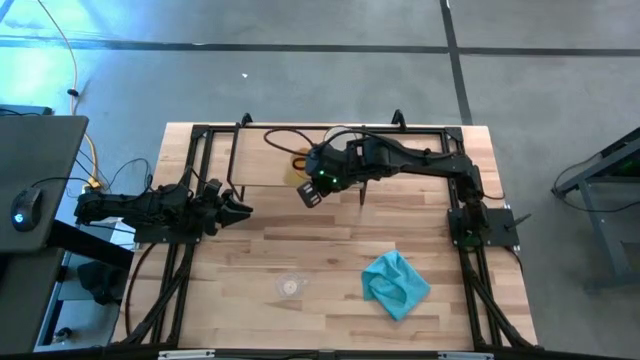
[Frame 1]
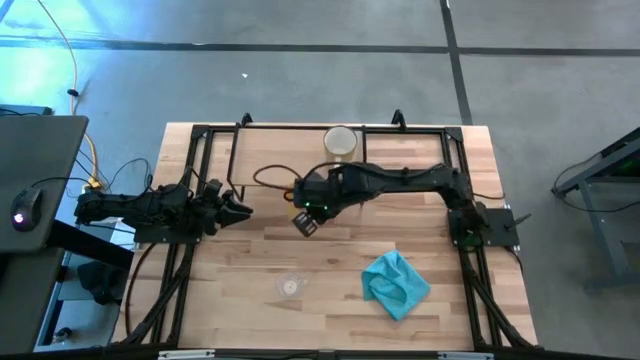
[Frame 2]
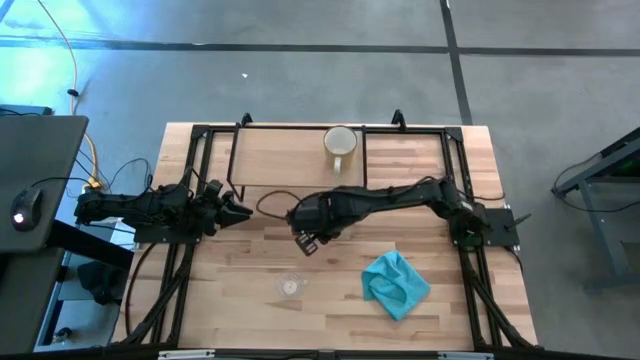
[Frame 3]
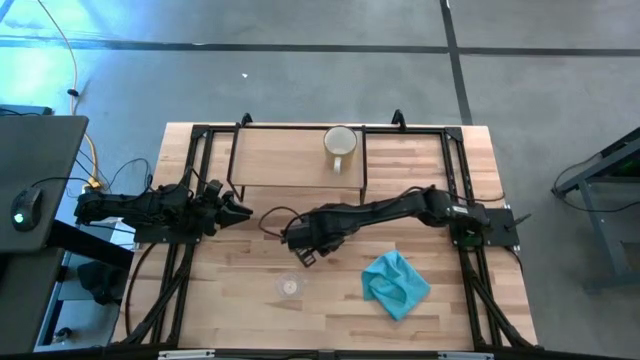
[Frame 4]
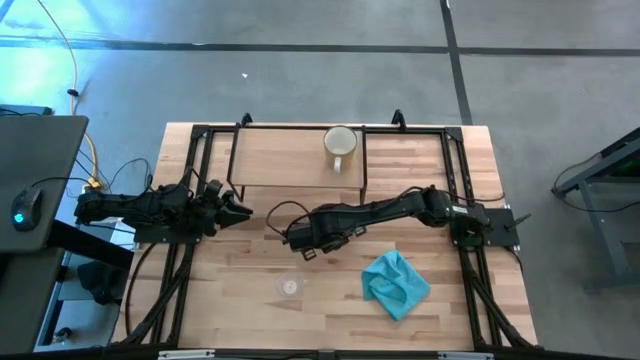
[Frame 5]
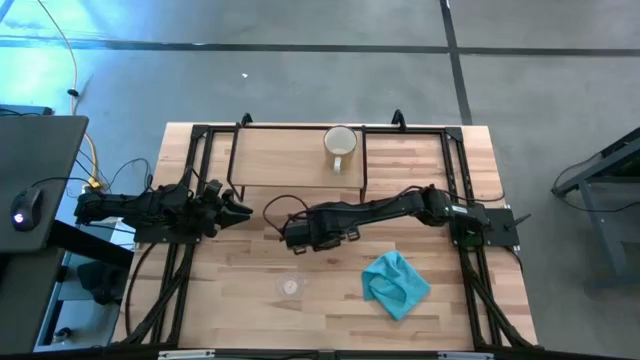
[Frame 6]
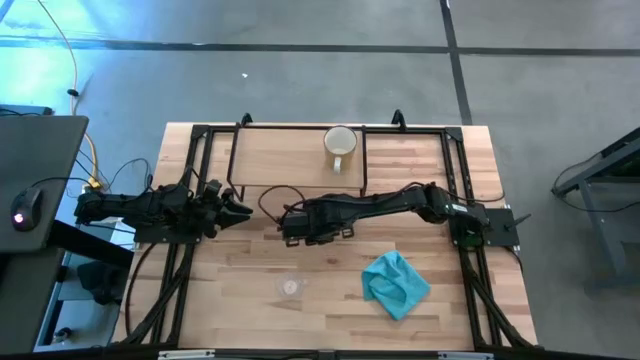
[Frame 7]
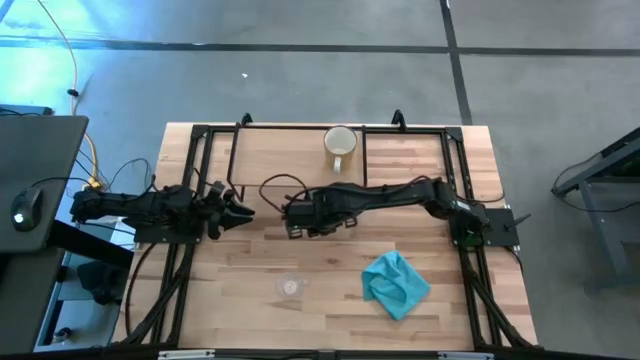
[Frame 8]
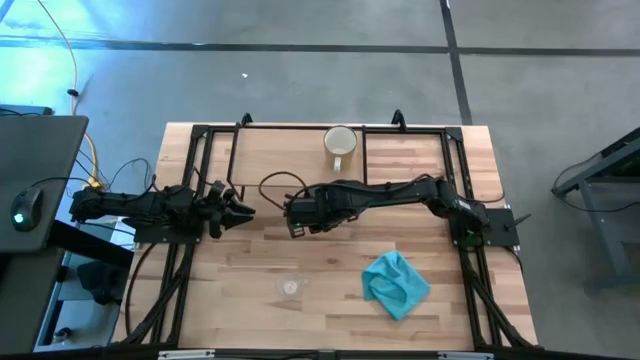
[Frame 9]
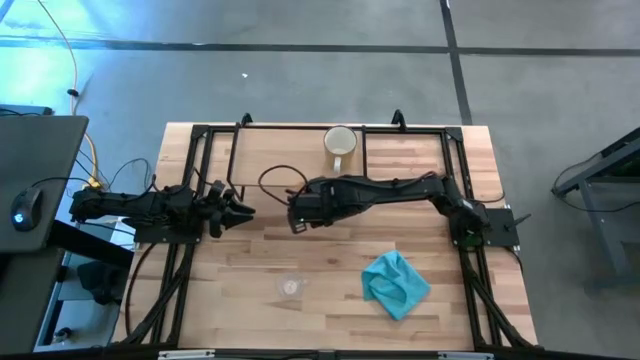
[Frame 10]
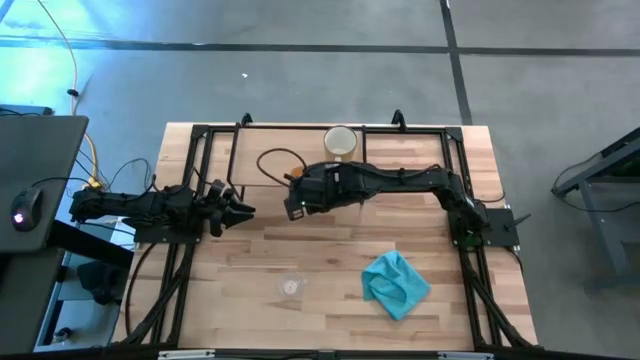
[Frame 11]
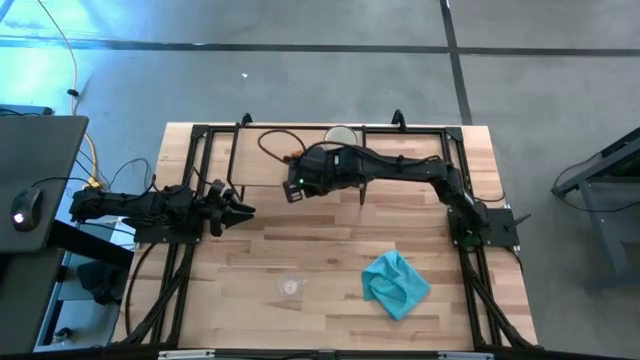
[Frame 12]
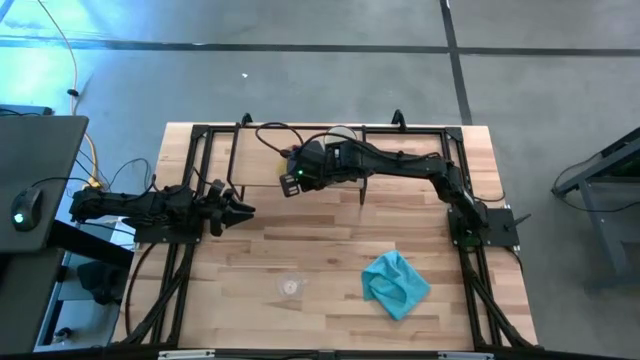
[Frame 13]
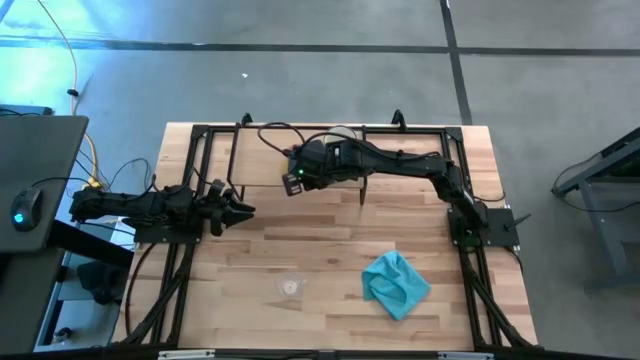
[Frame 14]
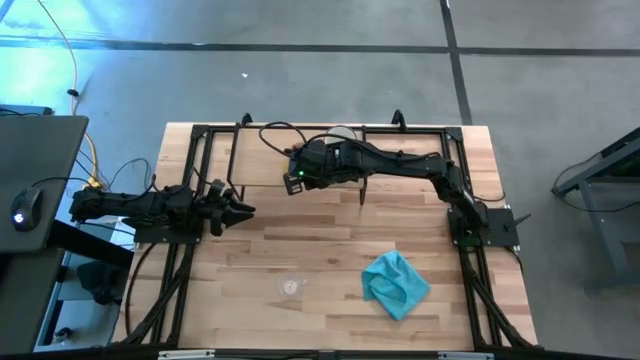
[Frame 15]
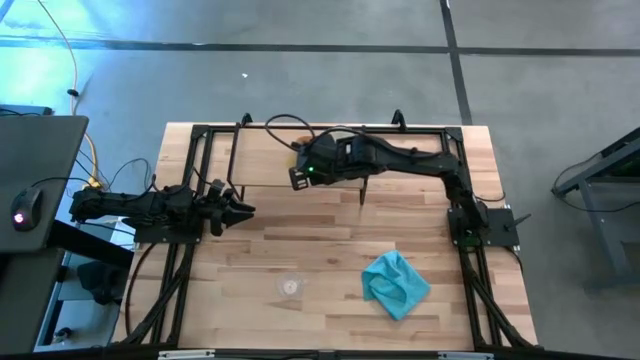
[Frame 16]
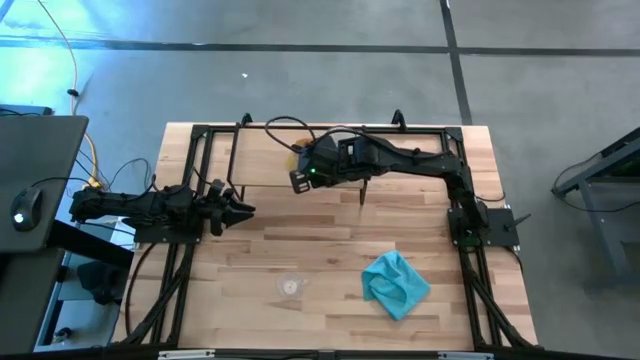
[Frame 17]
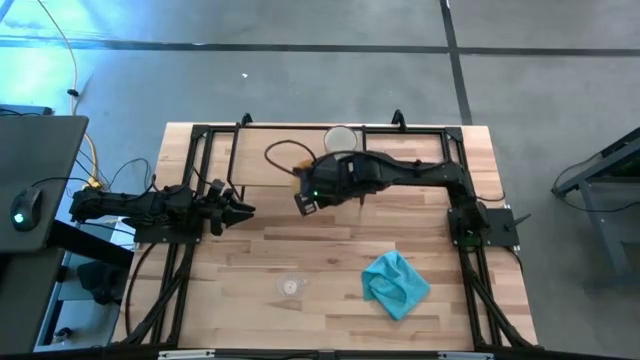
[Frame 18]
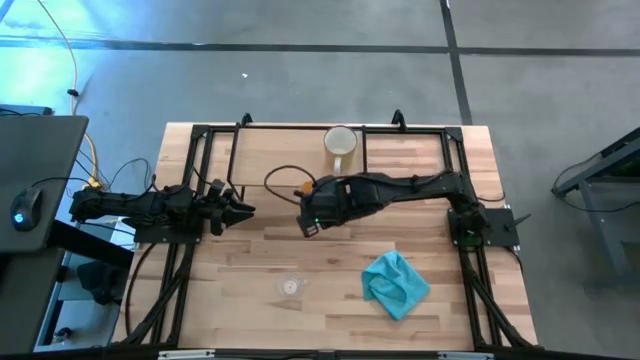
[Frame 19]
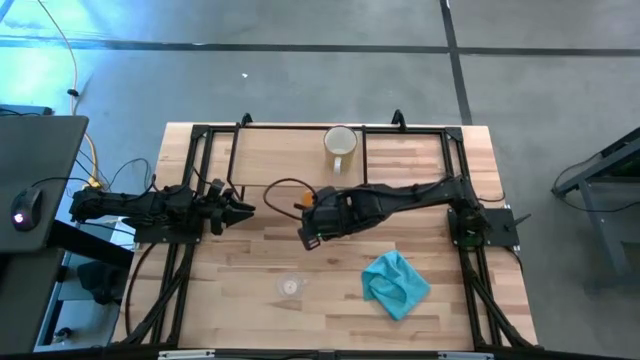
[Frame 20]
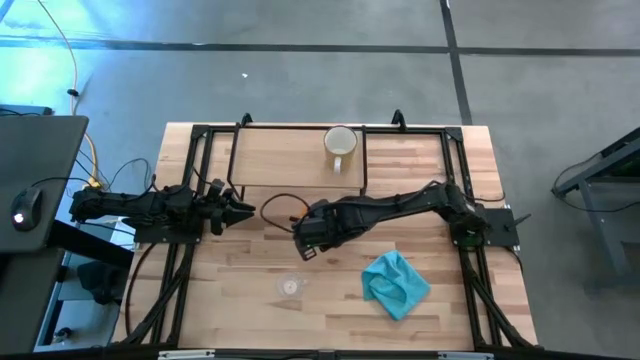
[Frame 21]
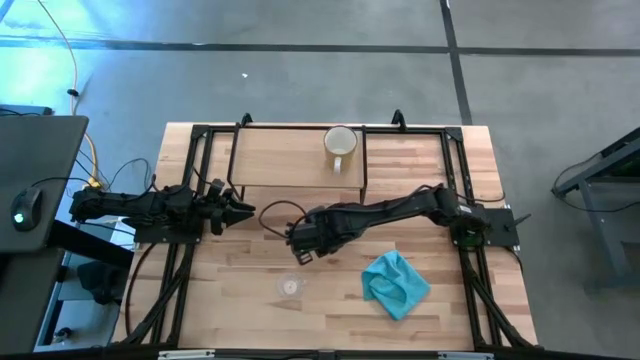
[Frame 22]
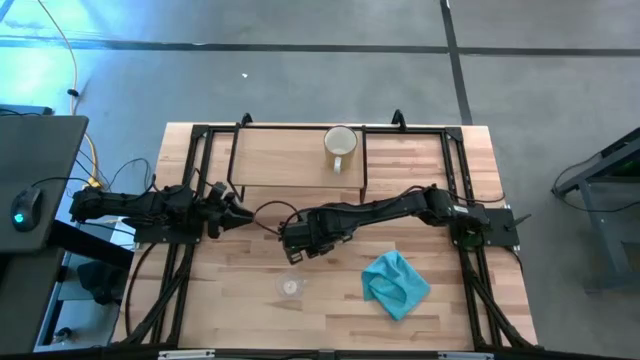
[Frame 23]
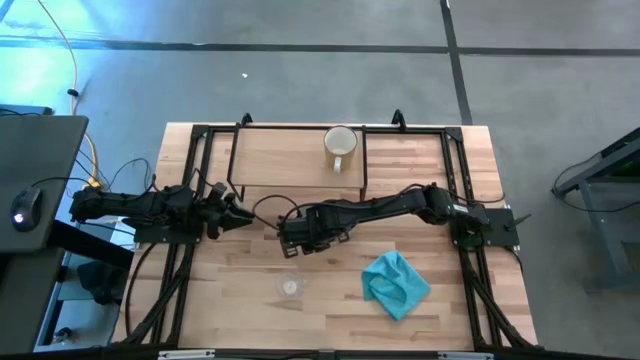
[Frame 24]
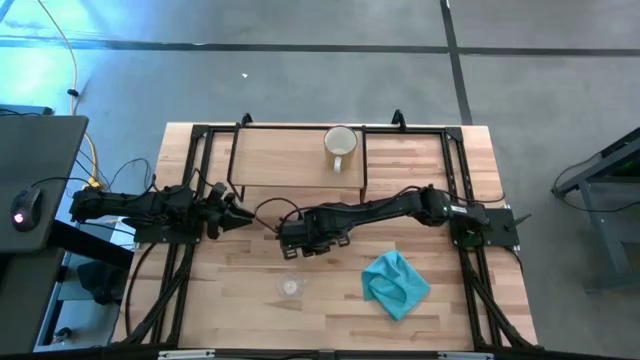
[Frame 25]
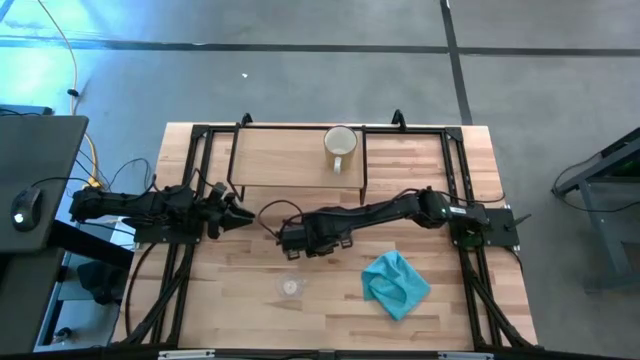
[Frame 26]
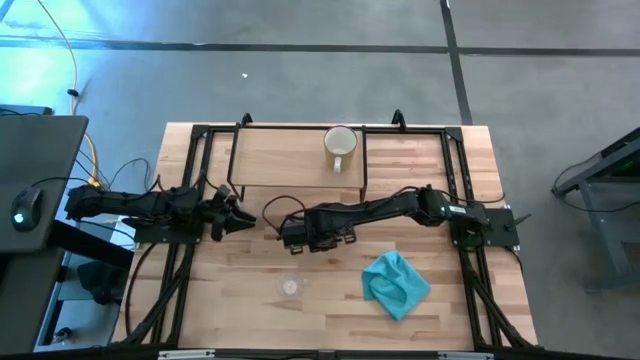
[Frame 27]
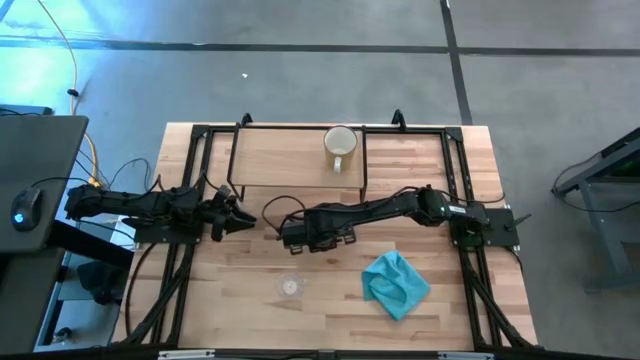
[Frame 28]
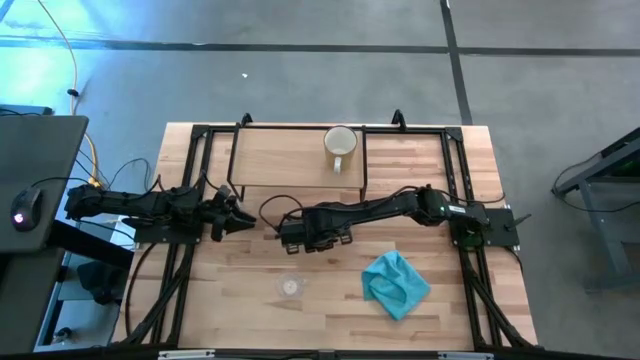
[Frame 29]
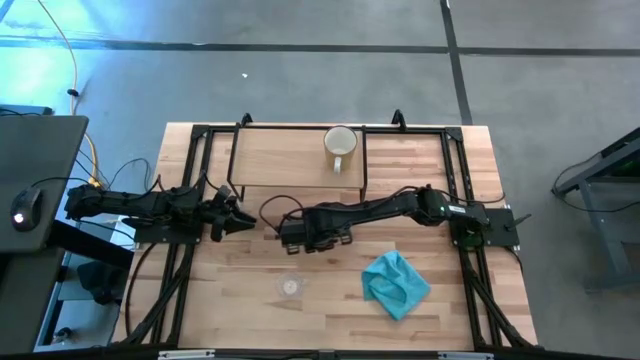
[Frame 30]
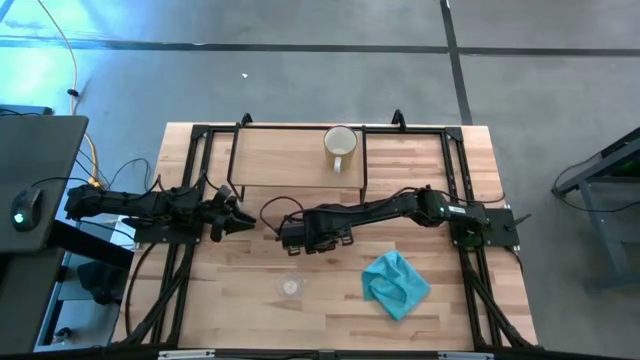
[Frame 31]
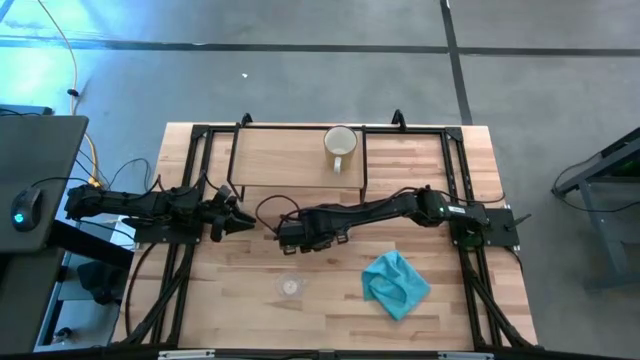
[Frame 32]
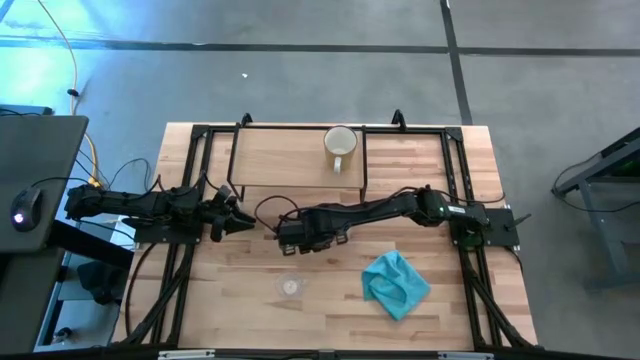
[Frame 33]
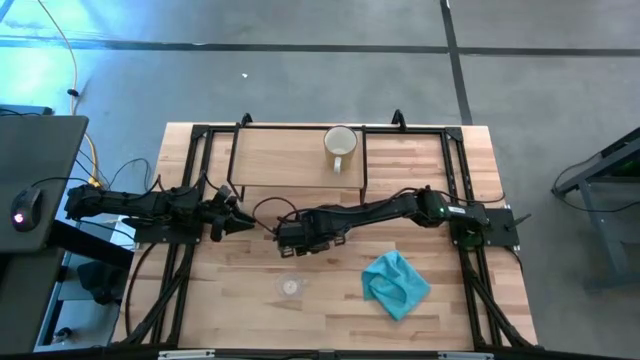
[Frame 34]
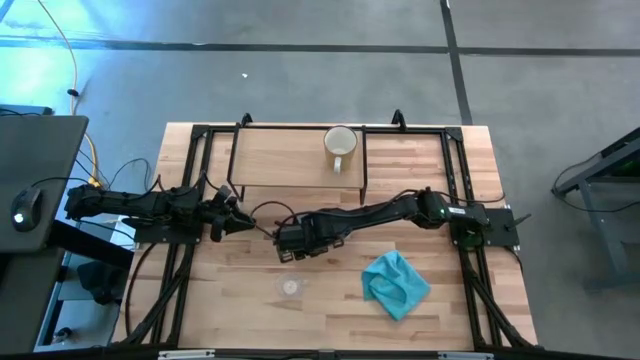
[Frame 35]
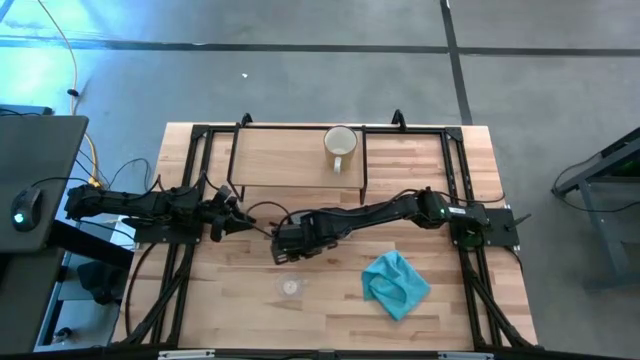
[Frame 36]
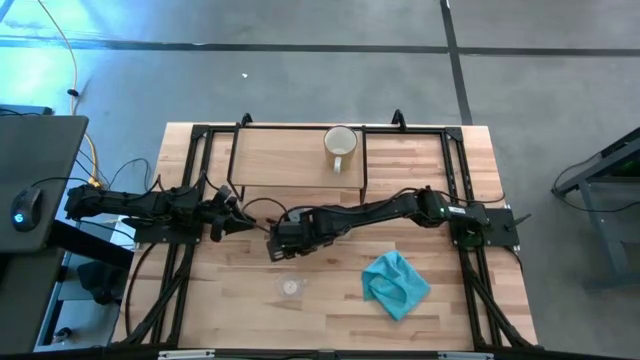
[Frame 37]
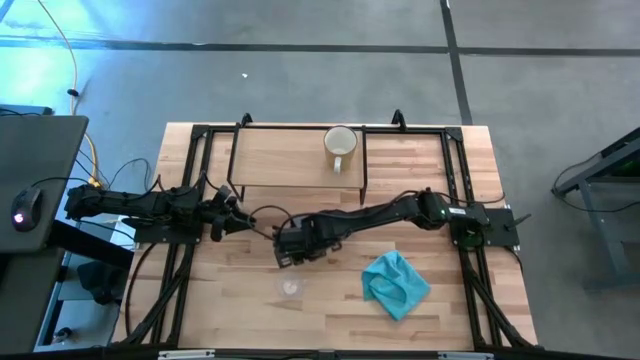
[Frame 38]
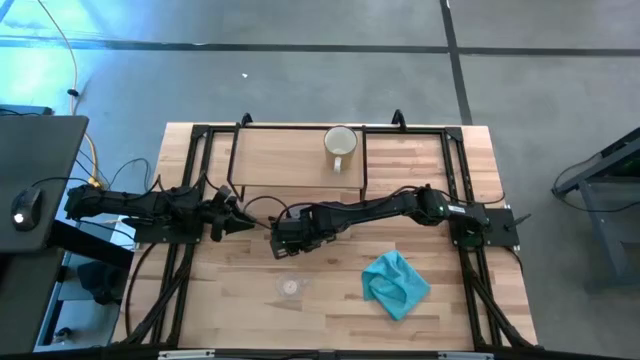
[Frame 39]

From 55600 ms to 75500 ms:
Task: Stack small to large cups/mugs on shelf
Put the yellow mug on the shelf

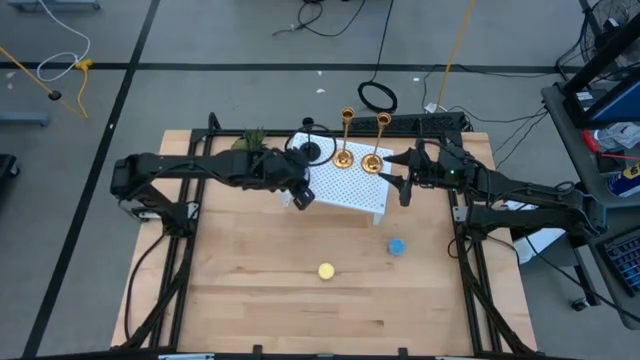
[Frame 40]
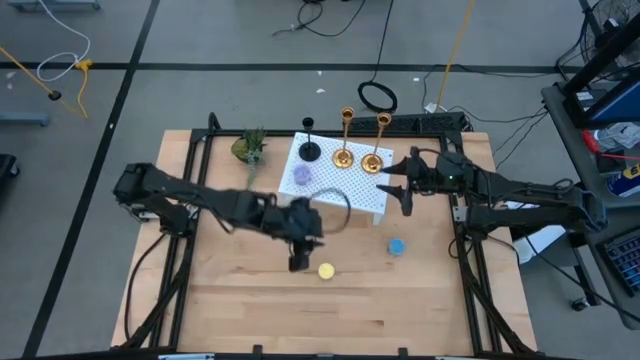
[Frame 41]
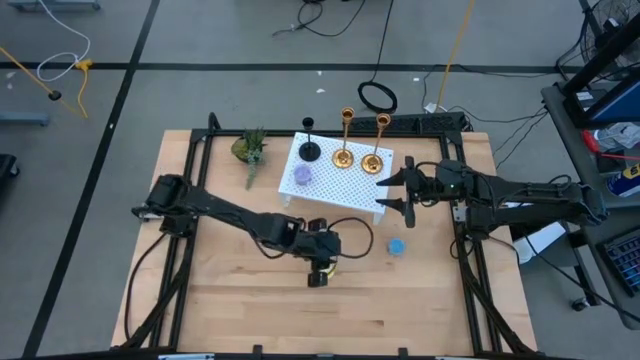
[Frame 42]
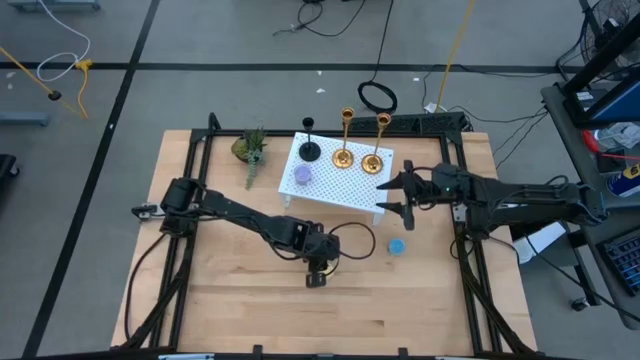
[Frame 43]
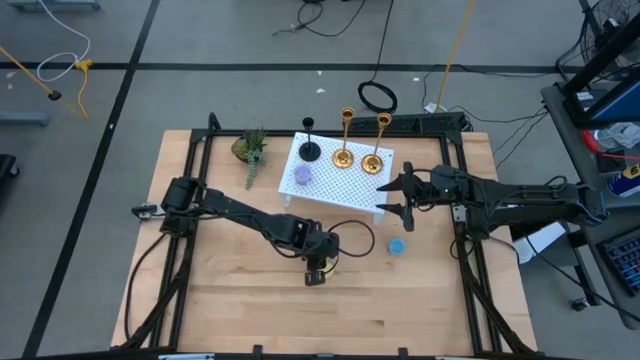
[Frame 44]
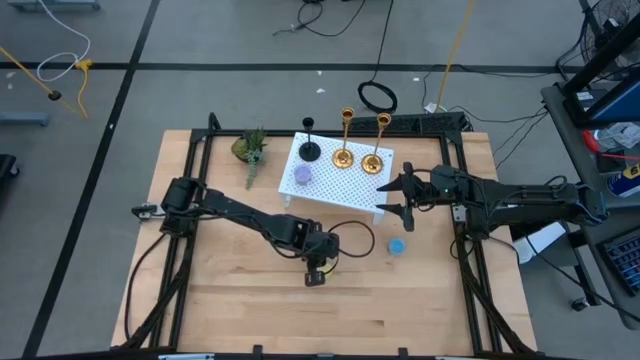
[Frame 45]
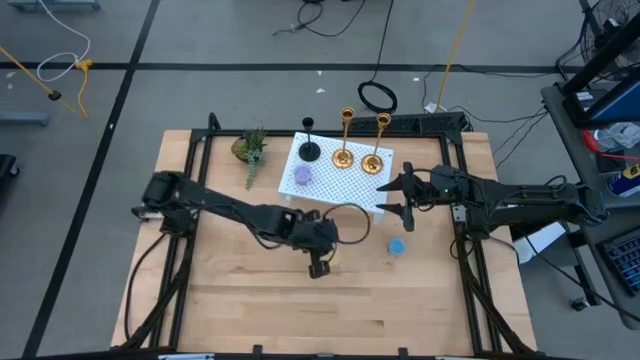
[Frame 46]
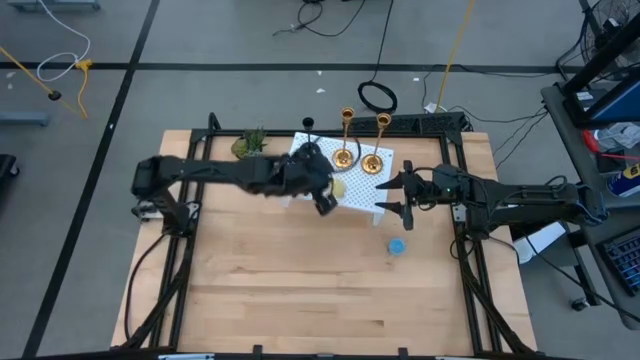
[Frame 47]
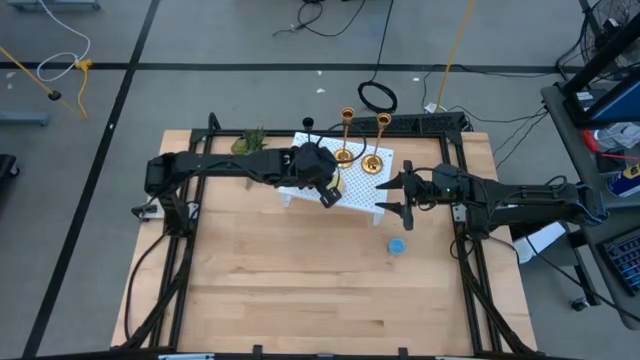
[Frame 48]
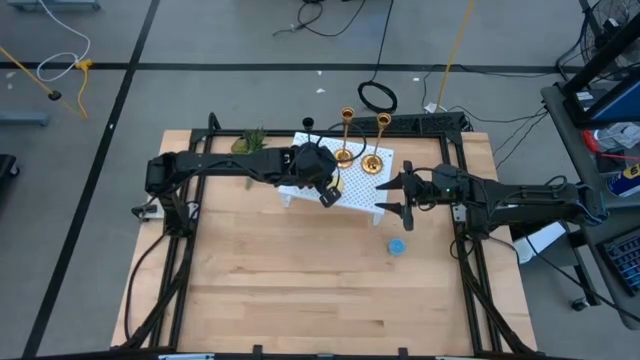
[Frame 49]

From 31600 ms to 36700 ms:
Task: Pick & Place candle stick holders
Put the yellow scented candle on the shelf
